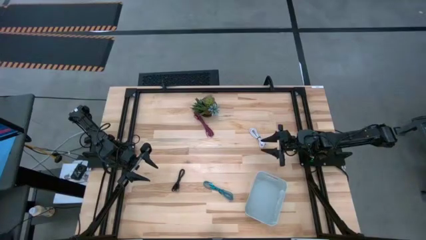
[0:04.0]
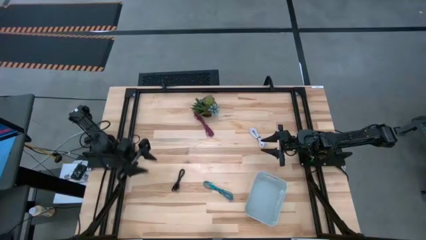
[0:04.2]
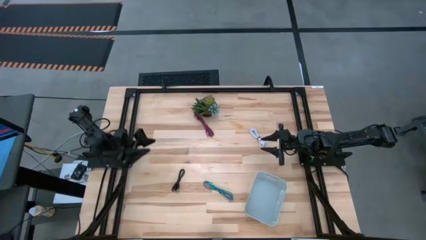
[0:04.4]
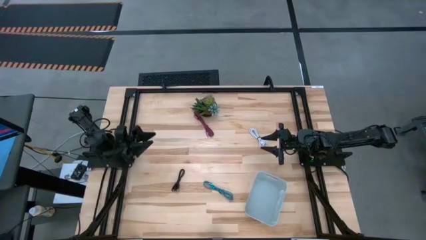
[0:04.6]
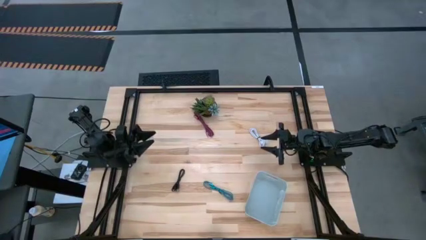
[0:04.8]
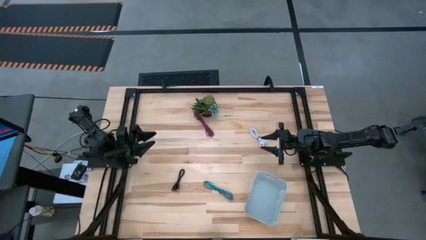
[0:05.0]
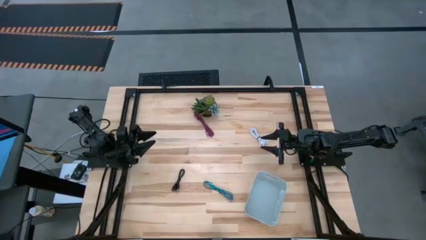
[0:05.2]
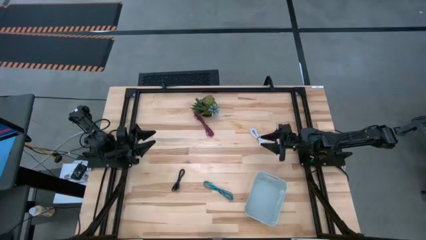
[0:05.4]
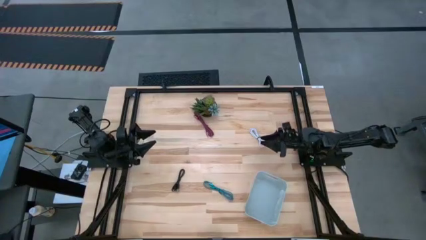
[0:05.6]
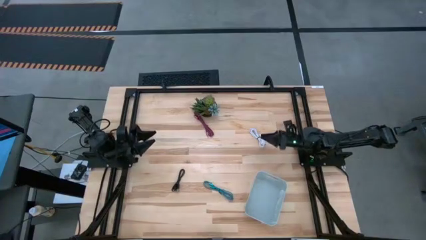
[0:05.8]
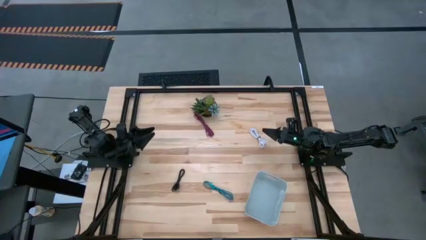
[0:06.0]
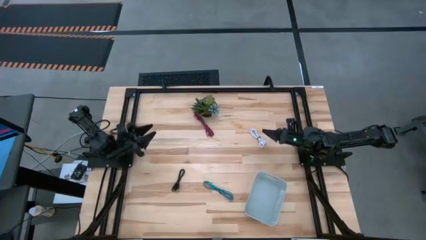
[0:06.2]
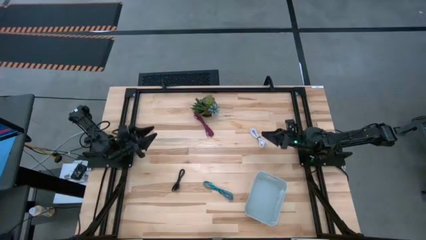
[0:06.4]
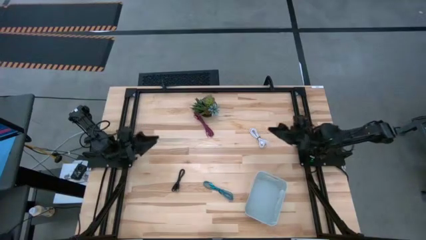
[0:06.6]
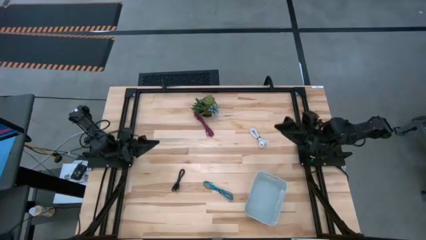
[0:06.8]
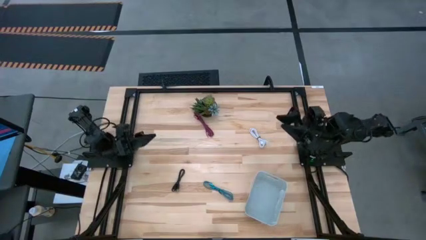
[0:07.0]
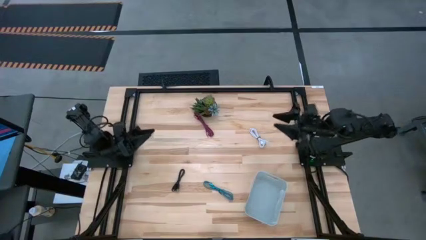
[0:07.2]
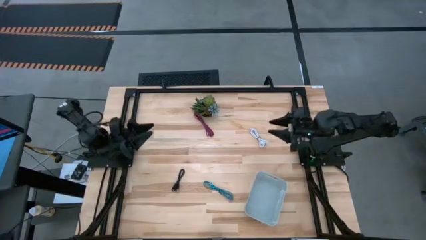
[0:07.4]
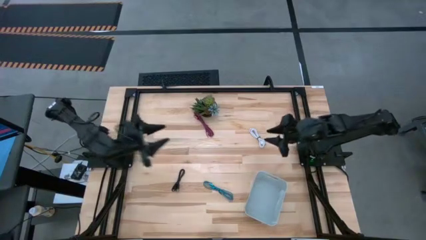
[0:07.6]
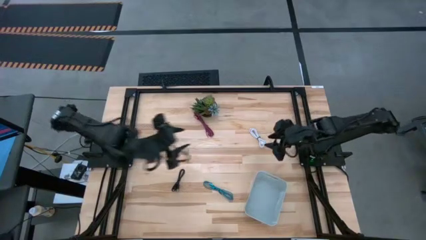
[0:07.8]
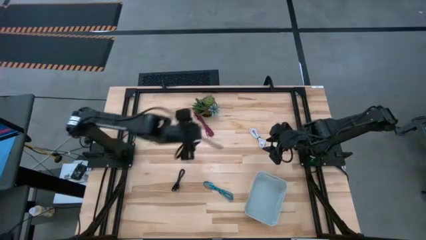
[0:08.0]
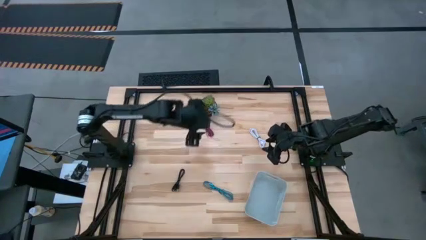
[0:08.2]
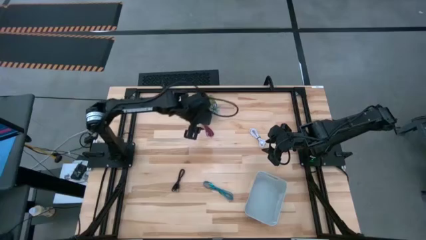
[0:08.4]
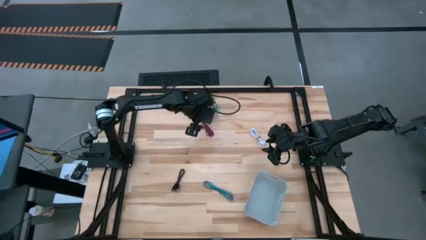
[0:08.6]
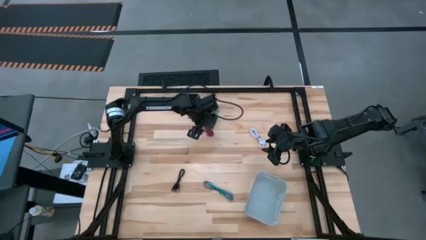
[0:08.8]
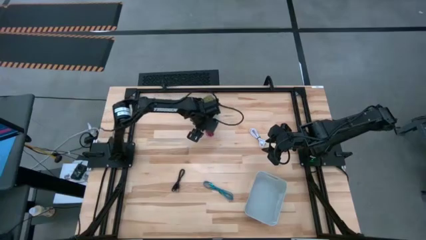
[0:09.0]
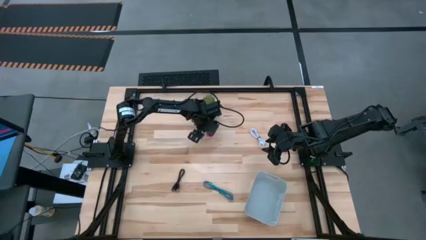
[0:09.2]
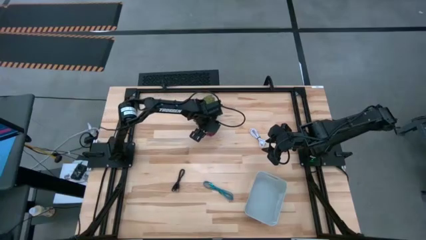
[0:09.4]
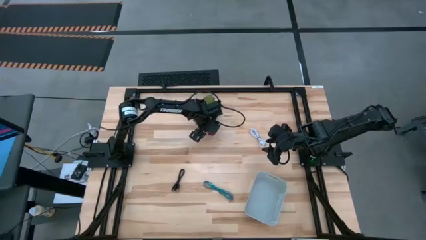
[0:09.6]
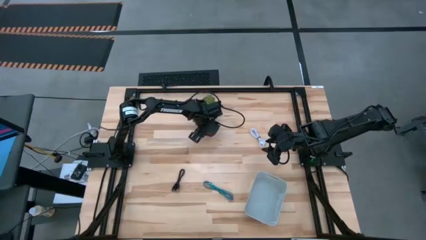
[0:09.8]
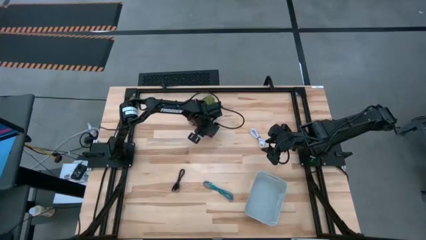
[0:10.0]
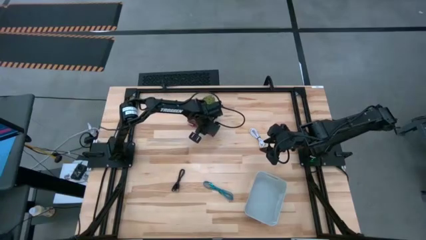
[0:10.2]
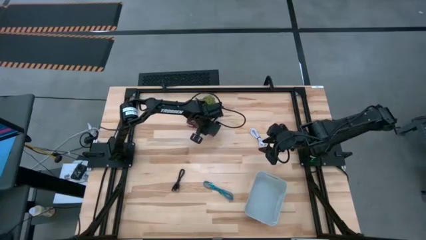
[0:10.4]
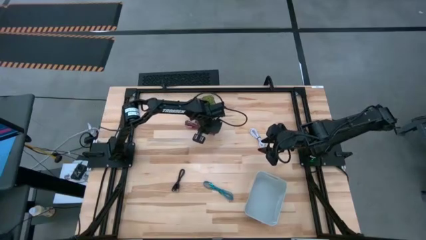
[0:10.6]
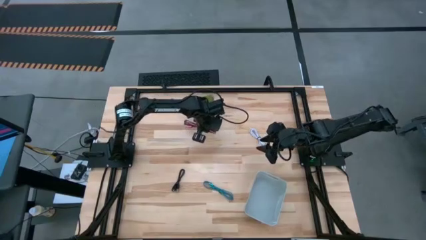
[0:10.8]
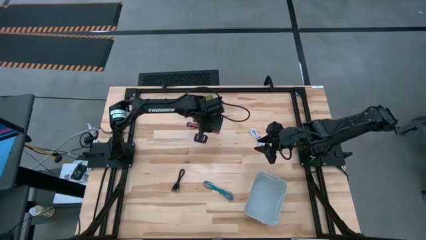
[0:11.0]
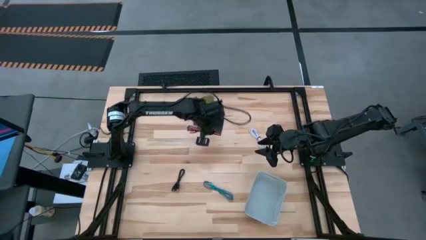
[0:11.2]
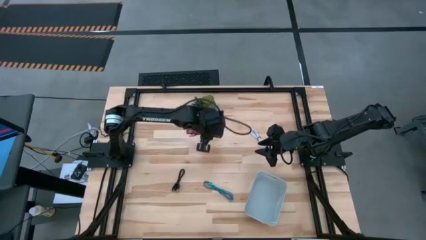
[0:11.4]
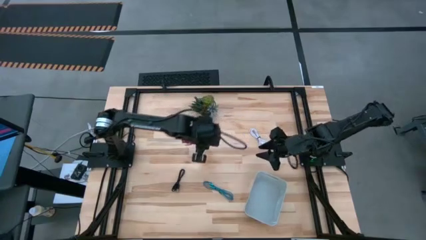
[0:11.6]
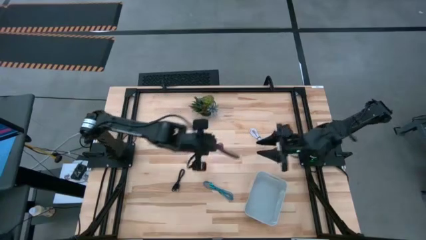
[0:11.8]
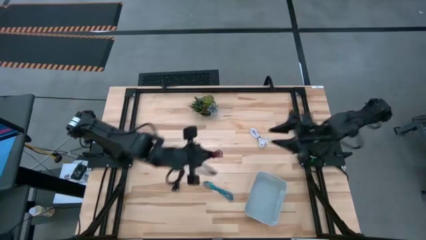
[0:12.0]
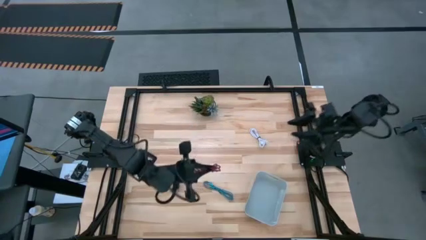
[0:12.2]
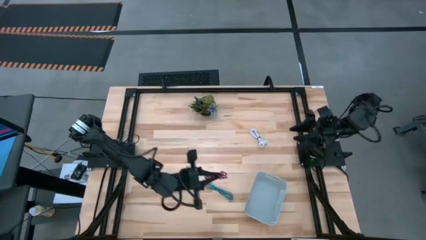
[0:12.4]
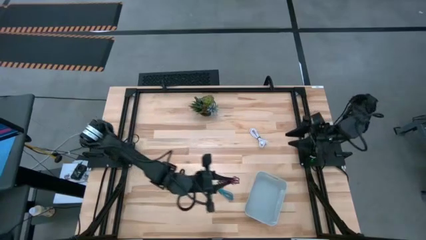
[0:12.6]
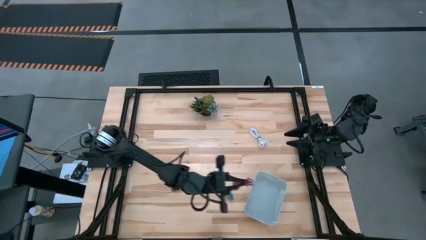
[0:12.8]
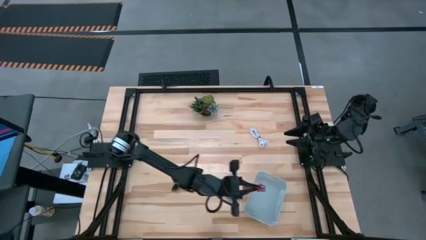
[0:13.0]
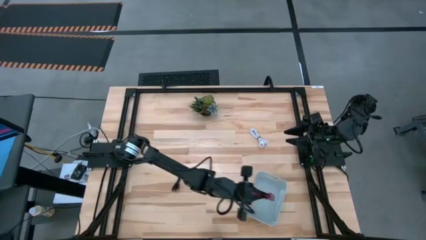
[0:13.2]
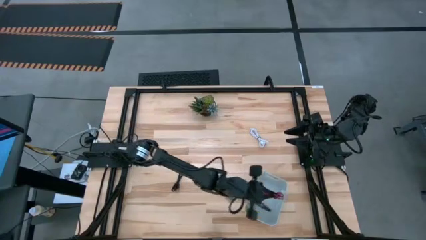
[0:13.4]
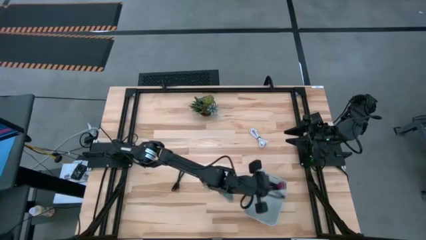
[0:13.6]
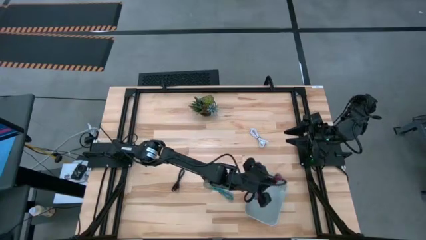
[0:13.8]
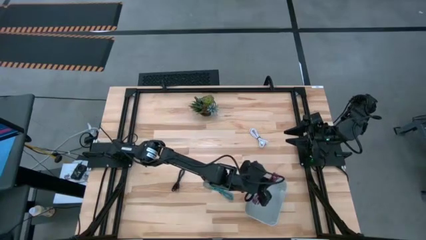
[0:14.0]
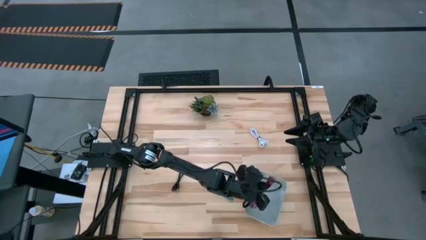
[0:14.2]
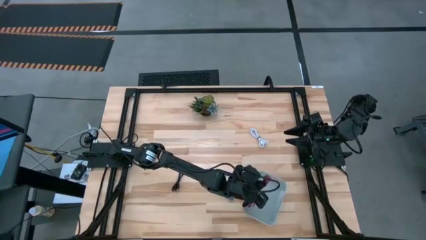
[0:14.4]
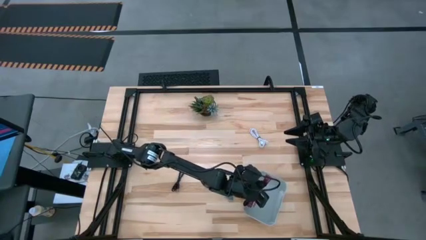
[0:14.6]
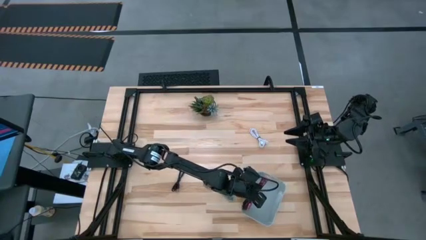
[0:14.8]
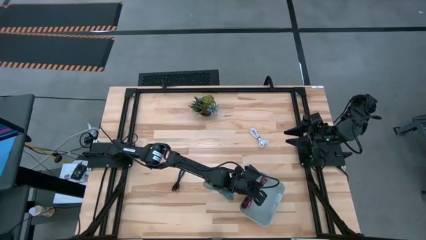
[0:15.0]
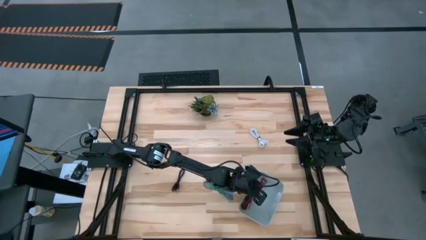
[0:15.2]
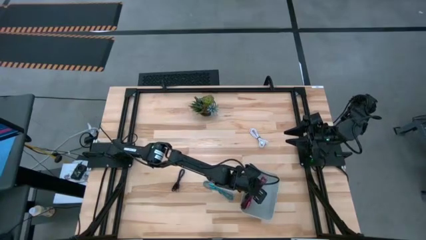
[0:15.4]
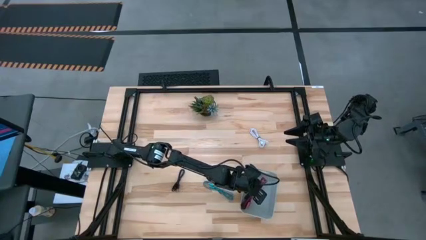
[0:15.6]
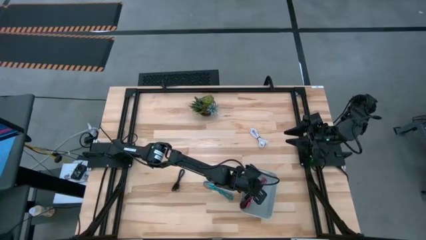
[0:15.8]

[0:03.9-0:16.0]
Task: Pick and place USB-C Cables
Put the pink charger cable into the white bin

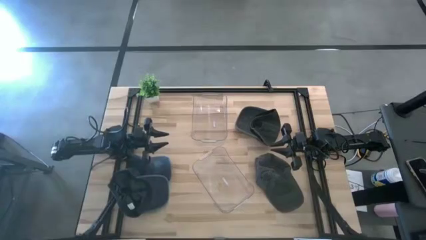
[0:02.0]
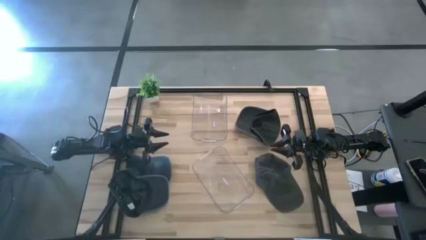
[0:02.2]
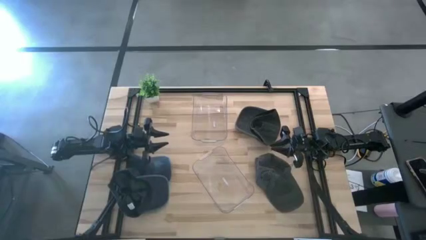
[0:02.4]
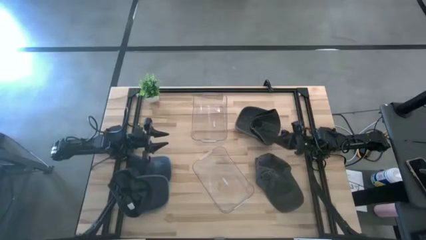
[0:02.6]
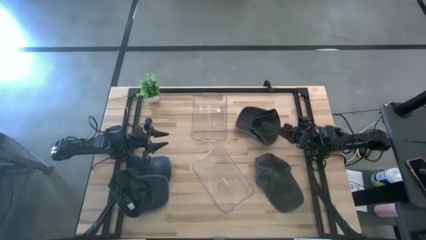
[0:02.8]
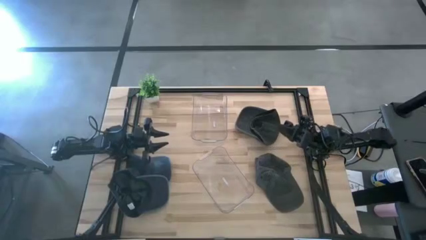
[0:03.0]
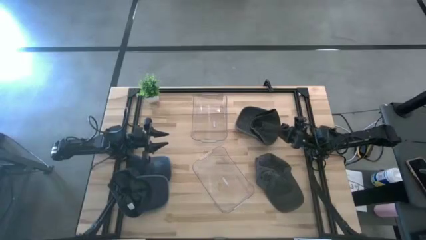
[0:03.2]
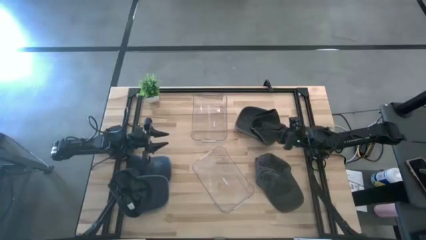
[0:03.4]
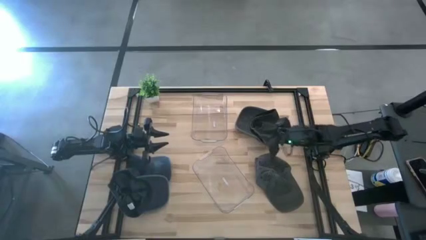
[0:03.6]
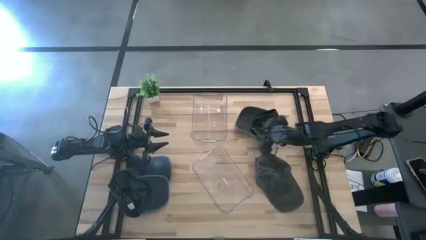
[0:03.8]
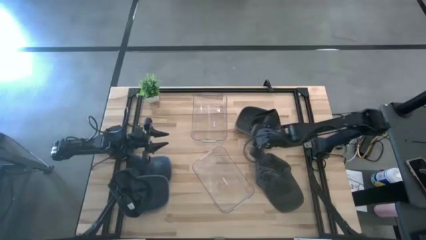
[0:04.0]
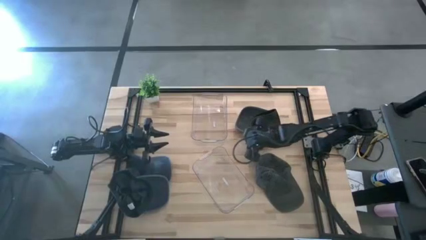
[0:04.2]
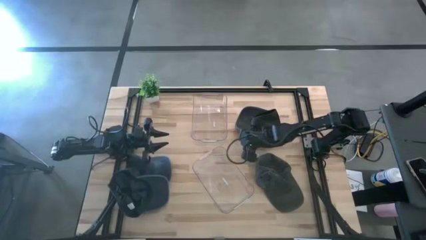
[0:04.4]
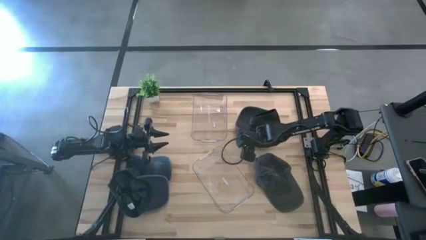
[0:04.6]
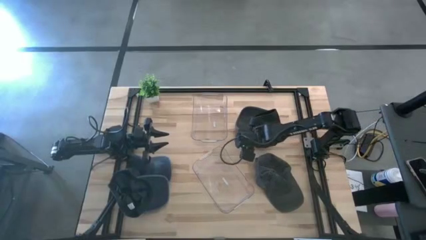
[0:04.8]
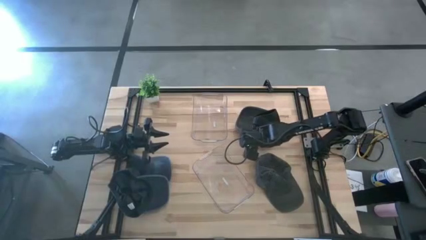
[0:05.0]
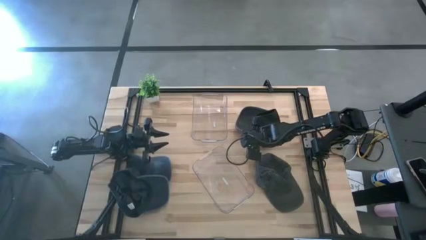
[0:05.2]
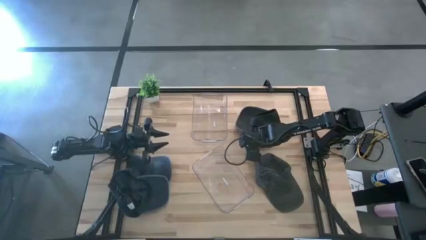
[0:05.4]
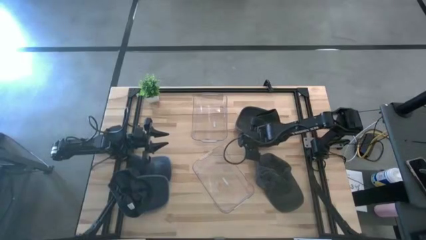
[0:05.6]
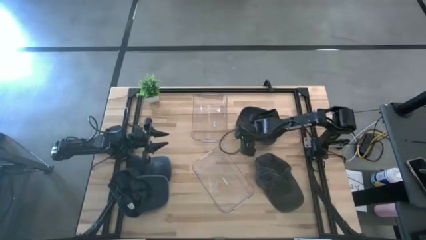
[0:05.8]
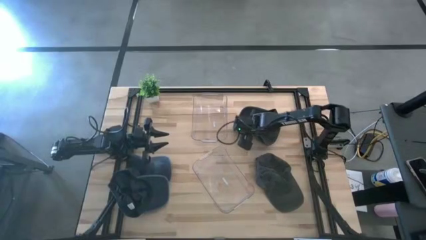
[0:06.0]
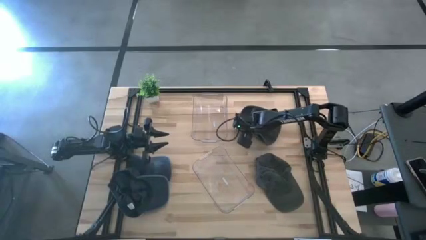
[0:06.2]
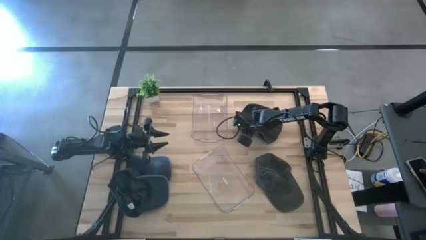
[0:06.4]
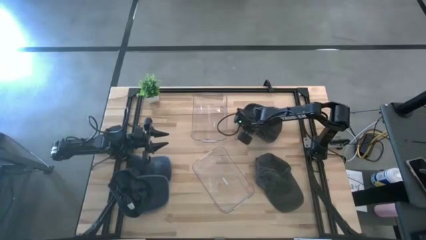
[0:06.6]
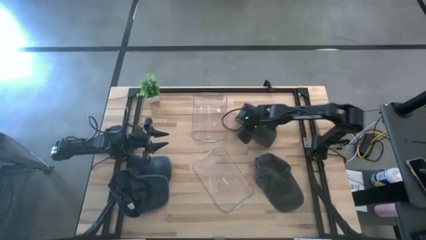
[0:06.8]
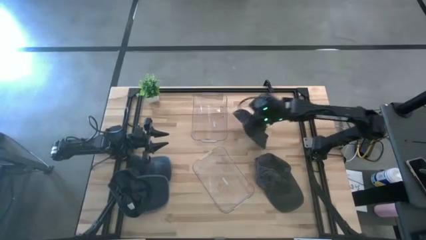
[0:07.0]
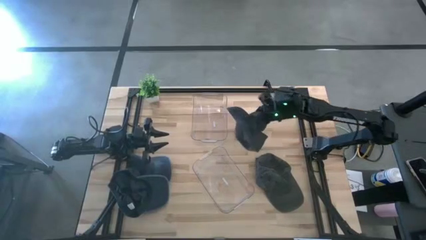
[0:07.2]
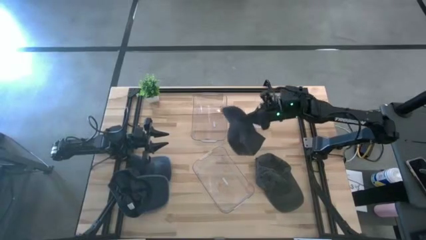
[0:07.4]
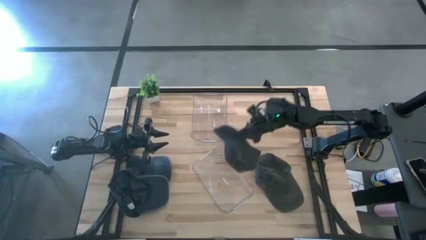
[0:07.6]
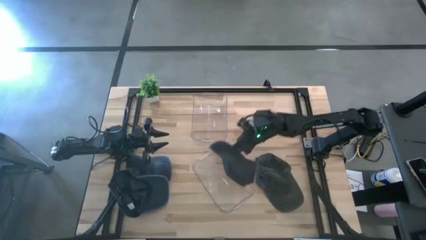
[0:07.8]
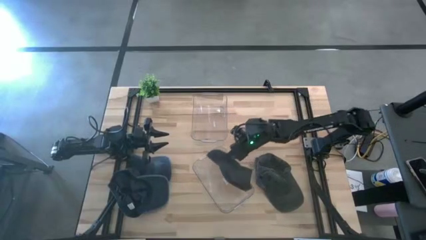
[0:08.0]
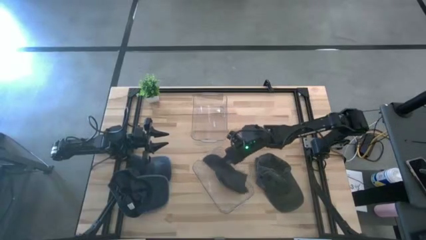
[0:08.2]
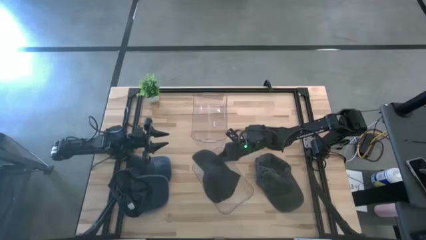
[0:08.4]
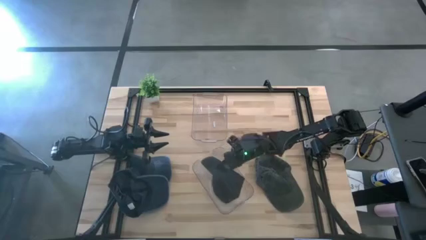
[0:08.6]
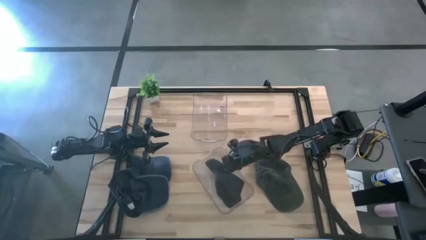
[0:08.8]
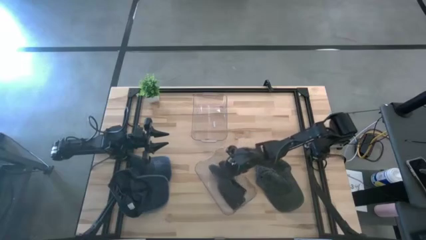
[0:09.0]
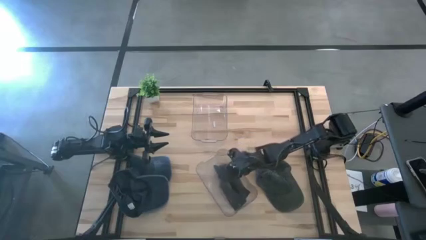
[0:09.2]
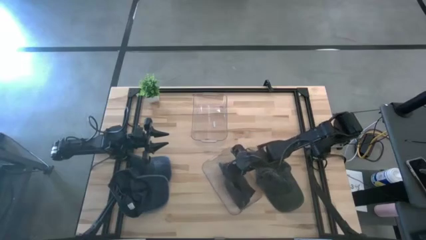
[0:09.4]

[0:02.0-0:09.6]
Task: Pick & Place hat
Put the black cap into the bottom transparent bin
